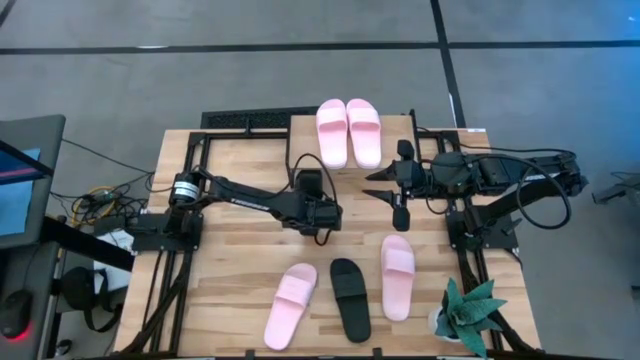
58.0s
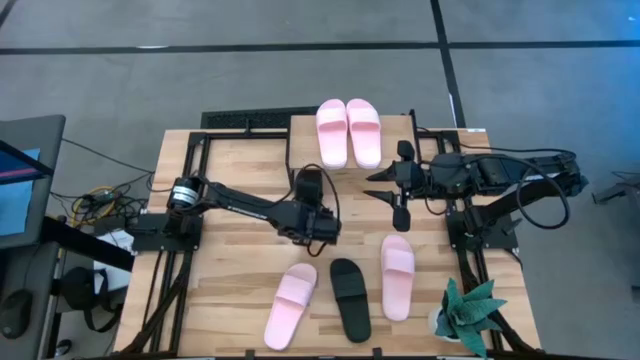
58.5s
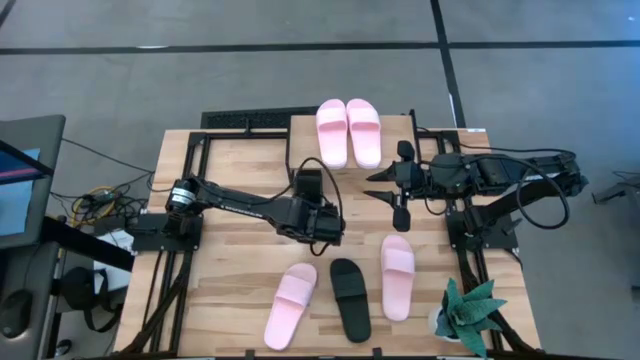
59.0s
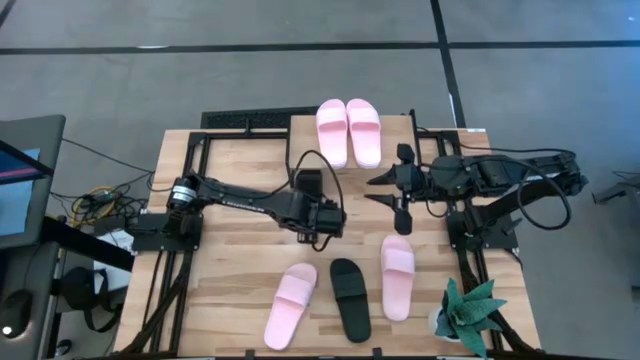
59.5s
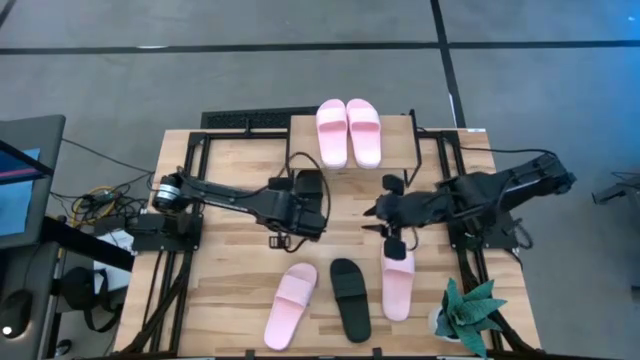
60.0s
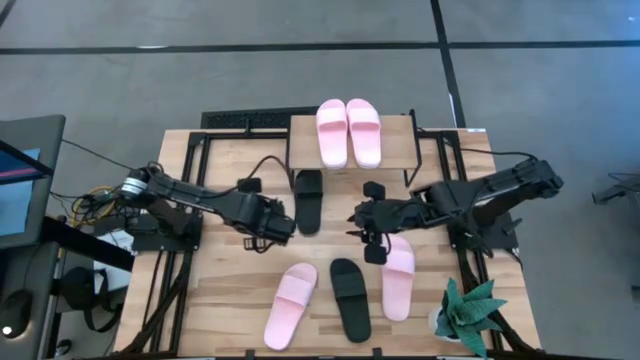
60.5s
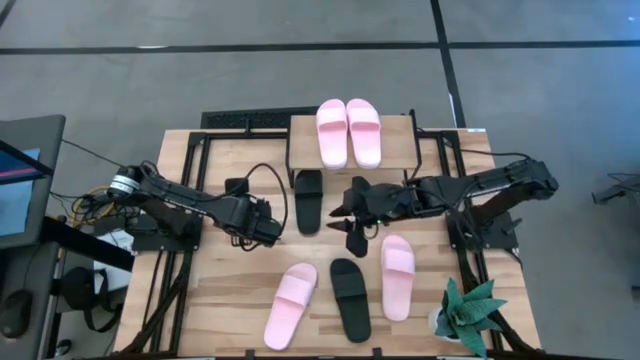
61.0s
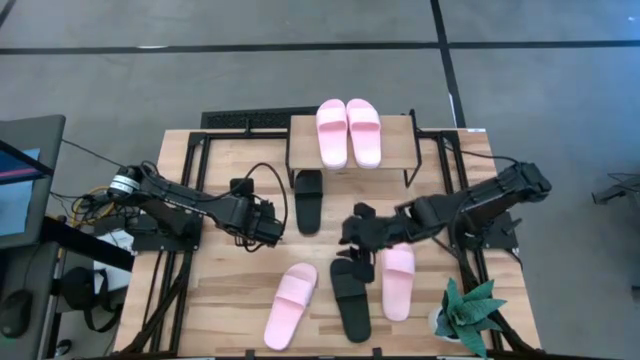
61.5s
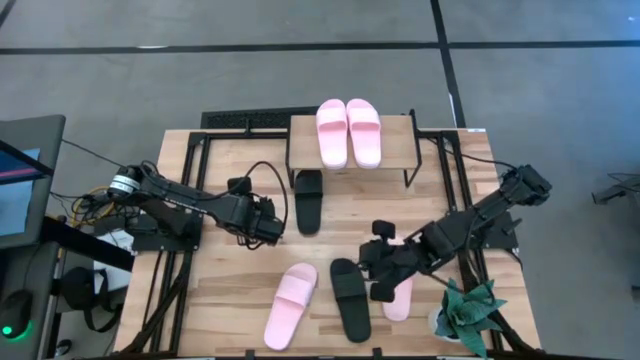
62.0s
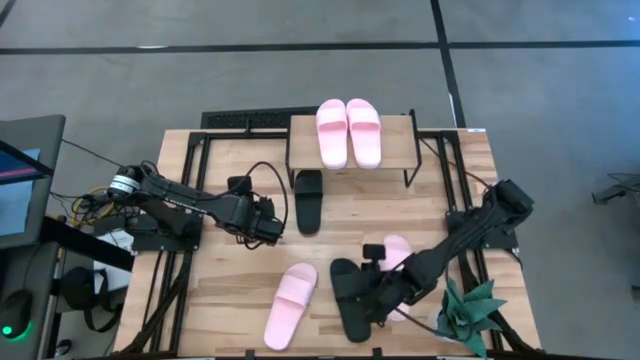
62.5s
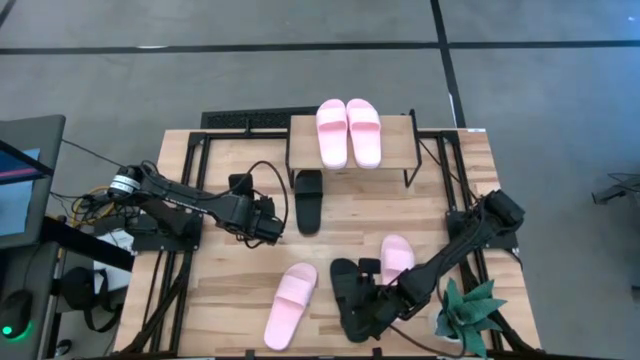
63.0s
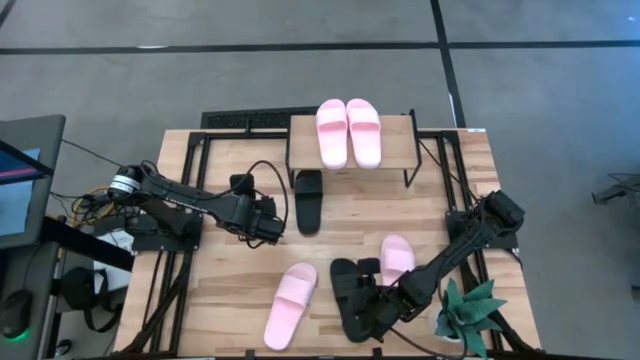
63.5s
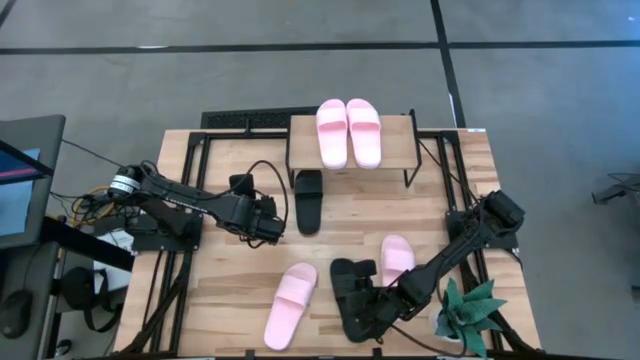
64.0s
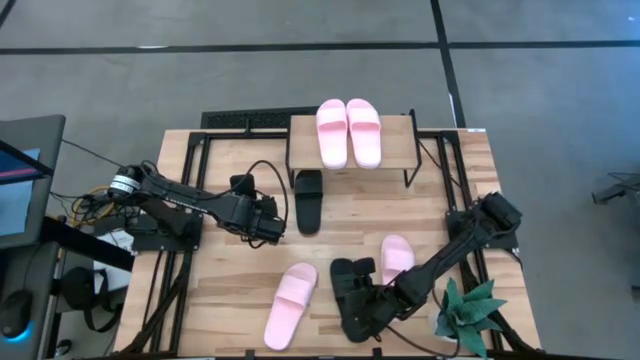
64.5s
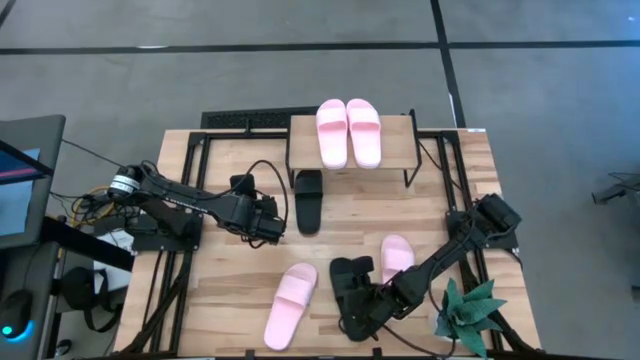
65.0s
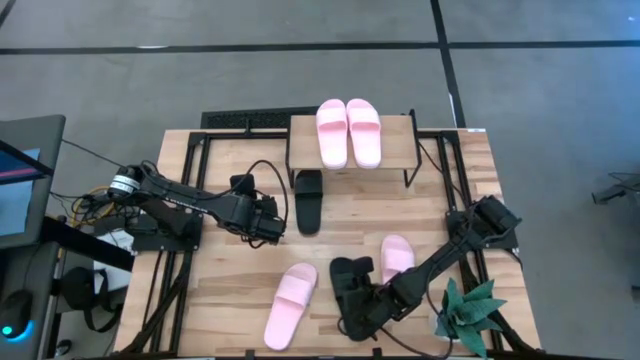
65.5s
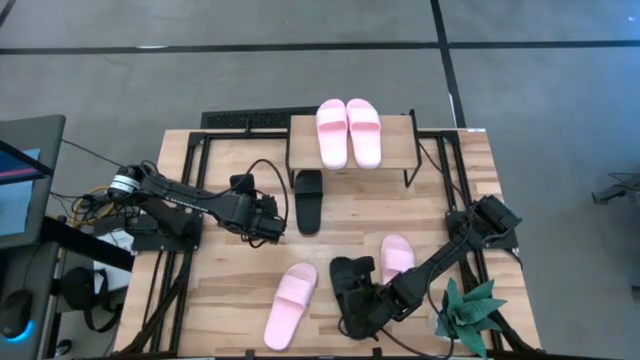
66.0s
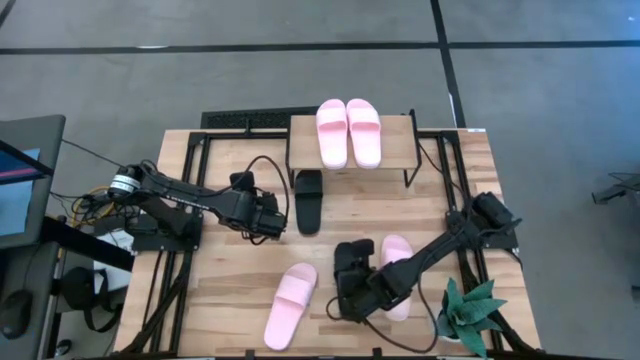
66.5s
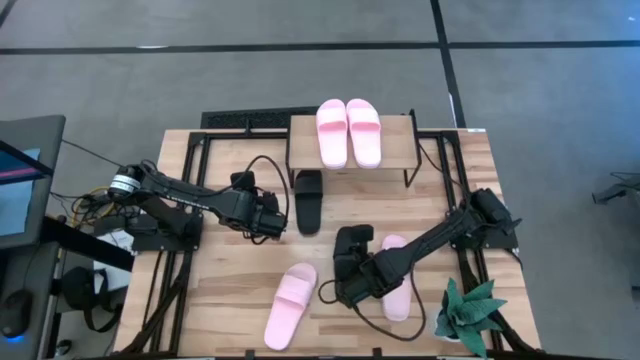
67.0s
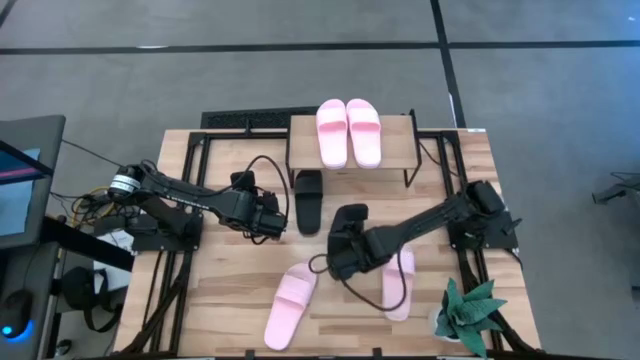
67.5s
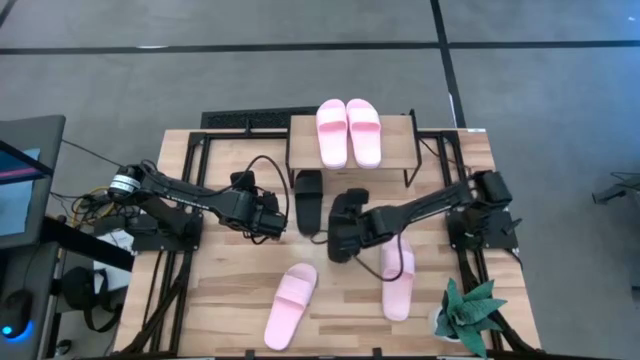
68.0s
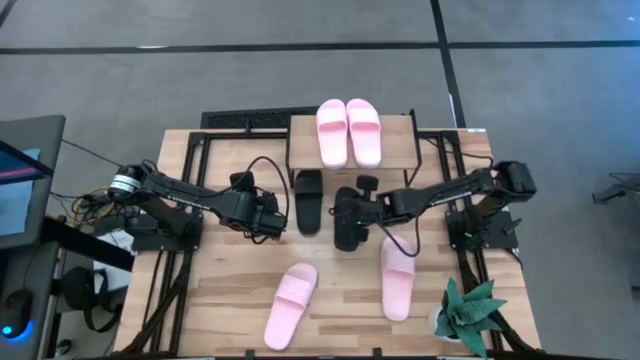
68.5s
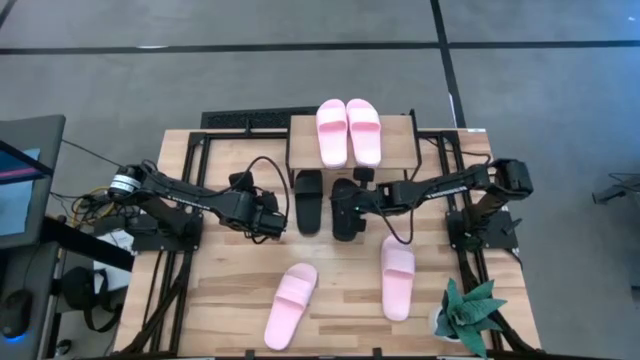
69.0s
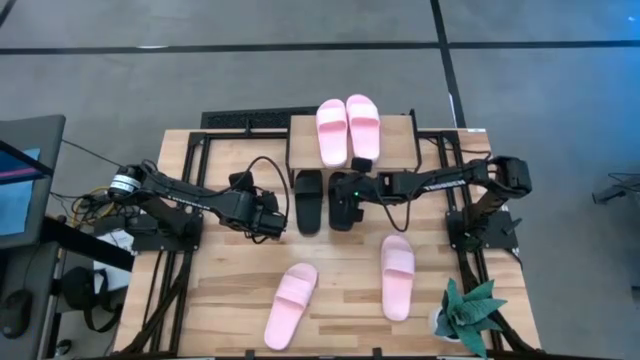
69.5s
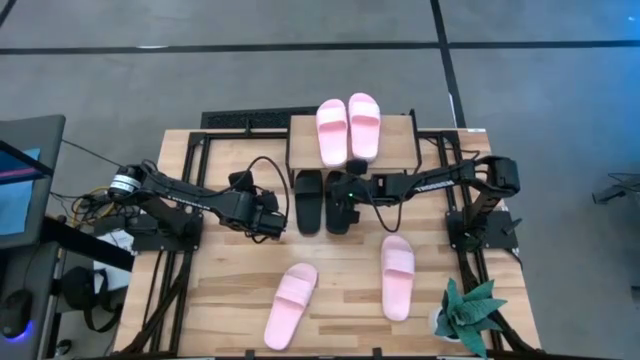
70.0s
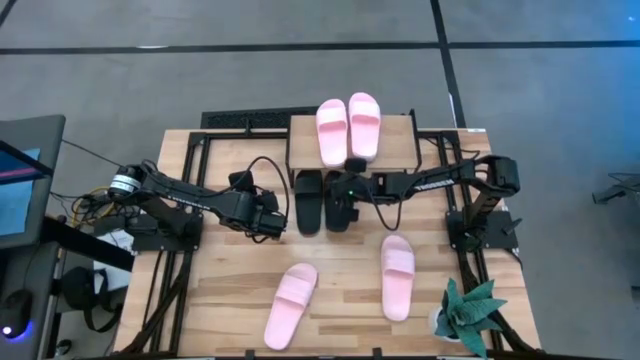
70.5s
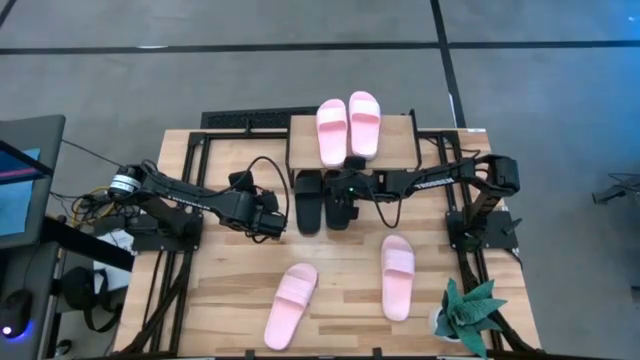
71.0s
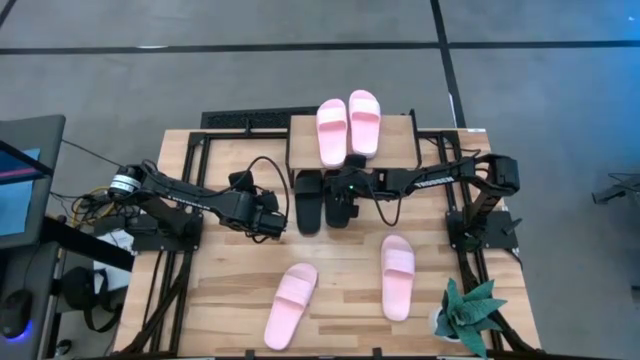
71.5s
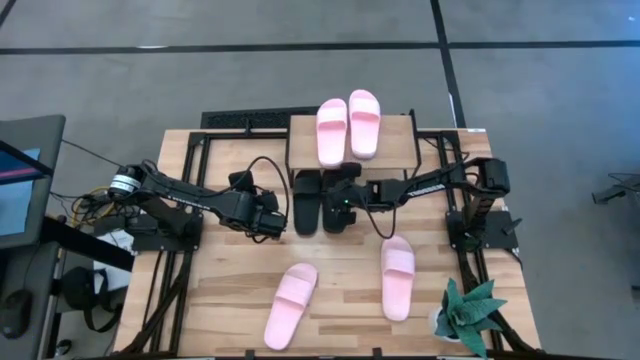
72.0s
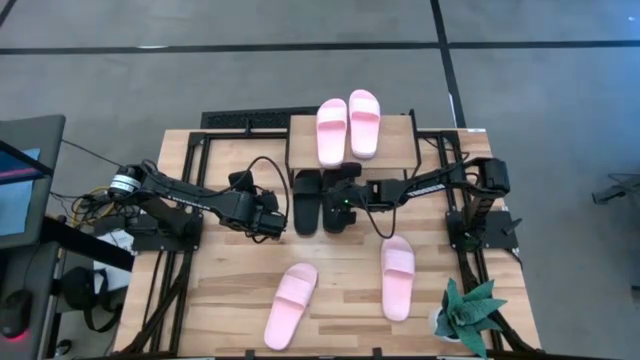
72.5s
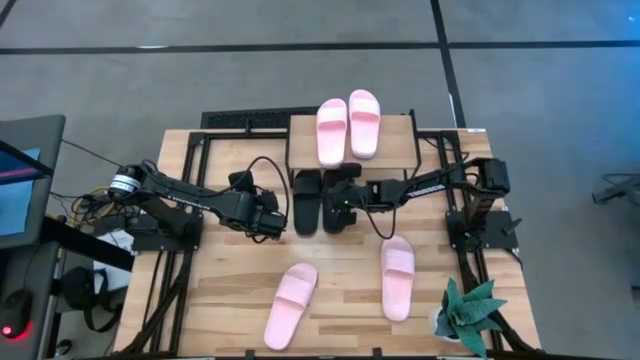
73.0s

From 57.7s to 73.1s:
Task: Pick and place slides into the shelf
Put the black slide under the shelf

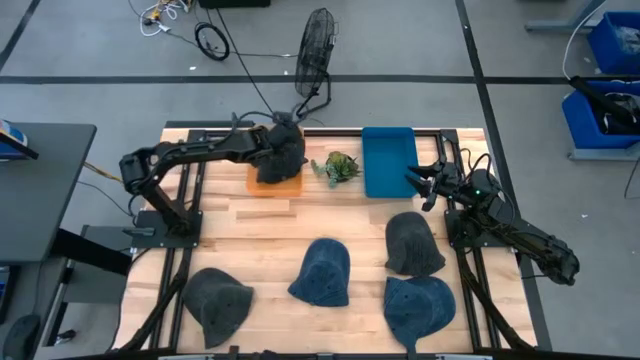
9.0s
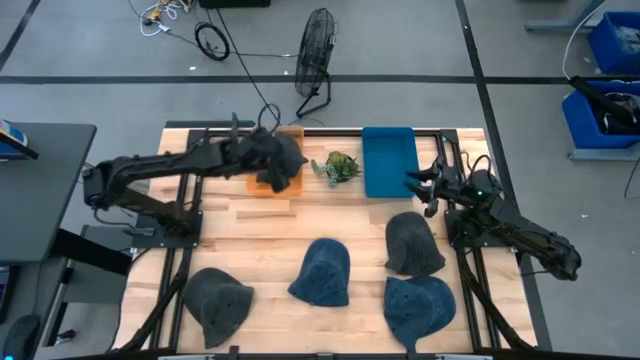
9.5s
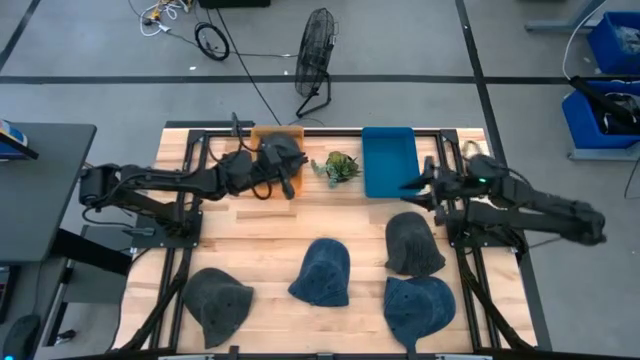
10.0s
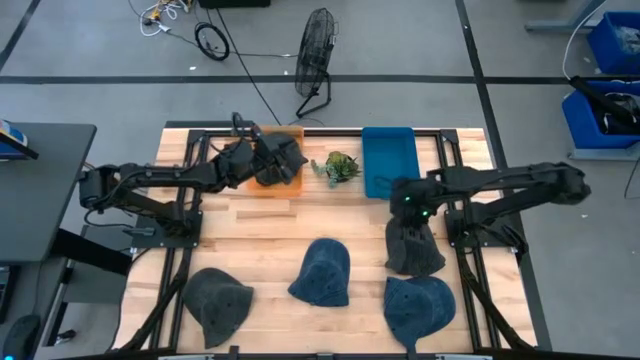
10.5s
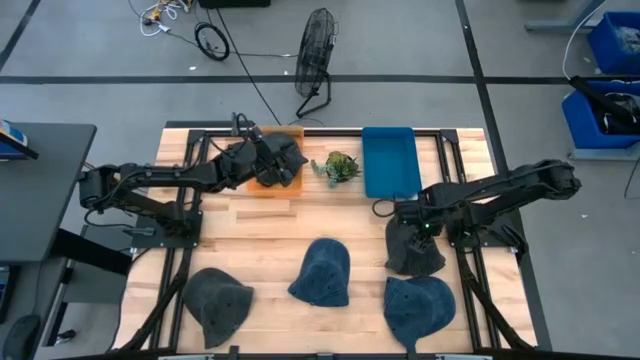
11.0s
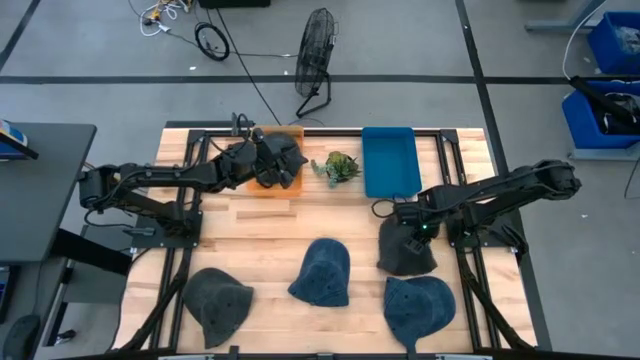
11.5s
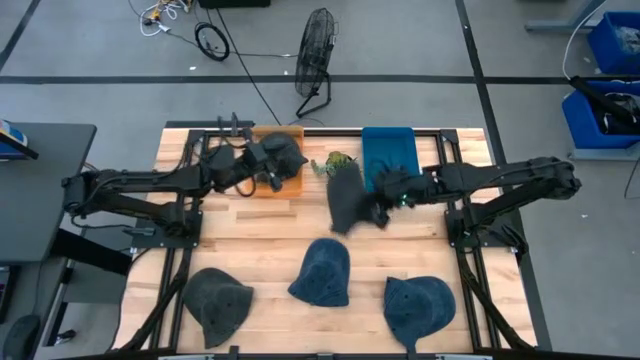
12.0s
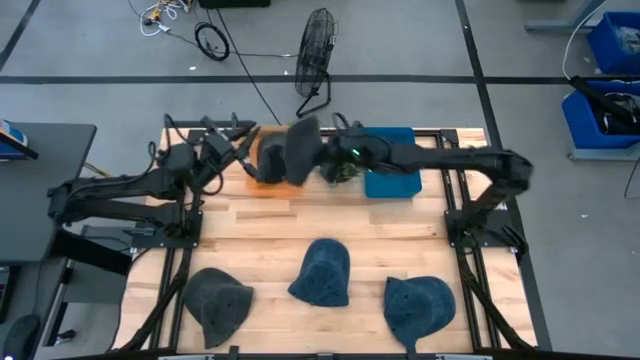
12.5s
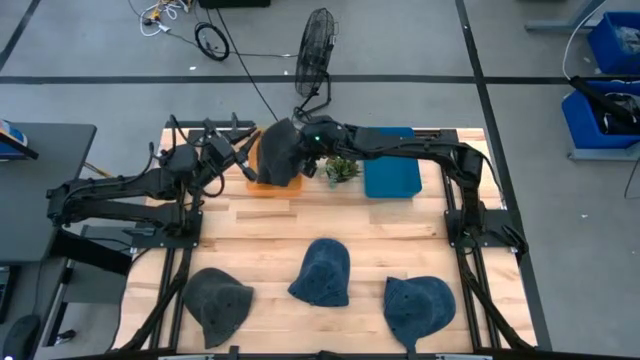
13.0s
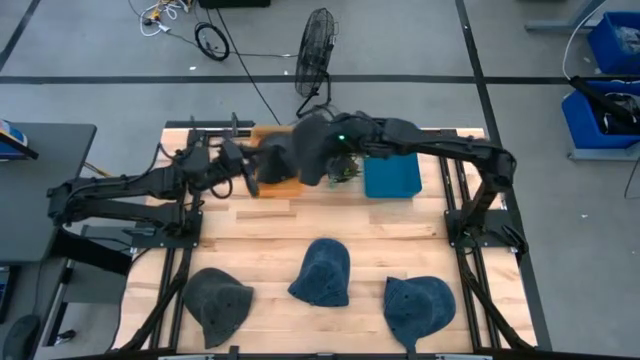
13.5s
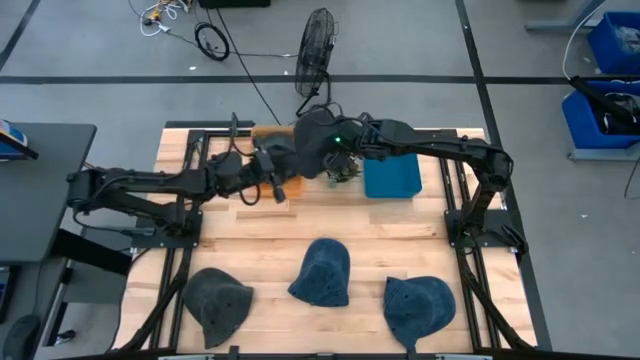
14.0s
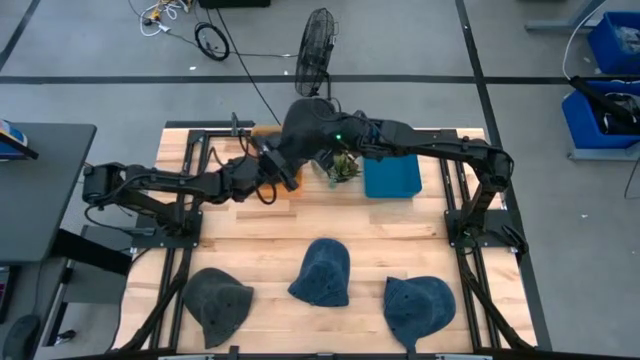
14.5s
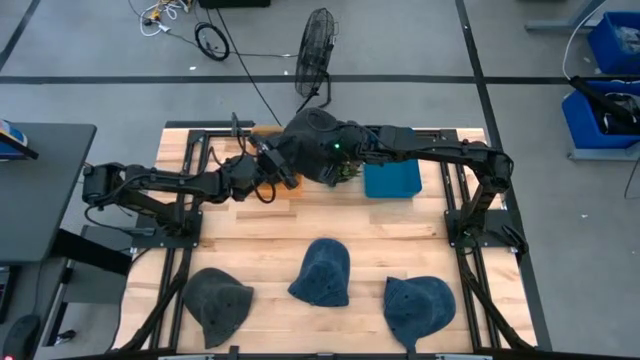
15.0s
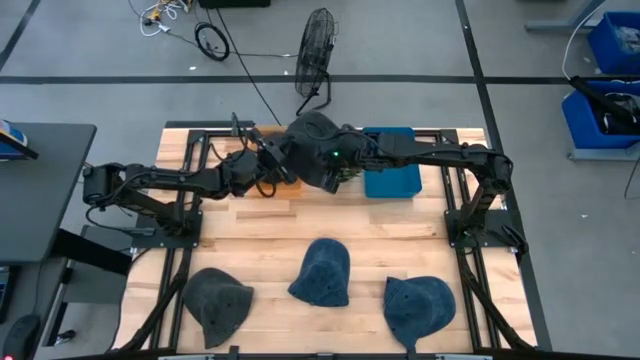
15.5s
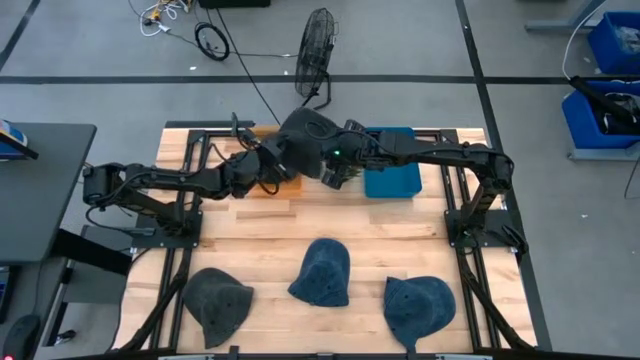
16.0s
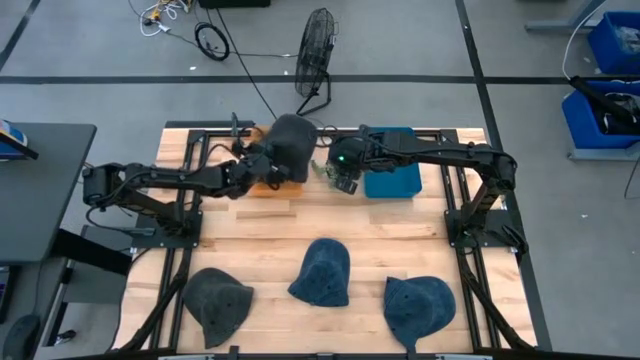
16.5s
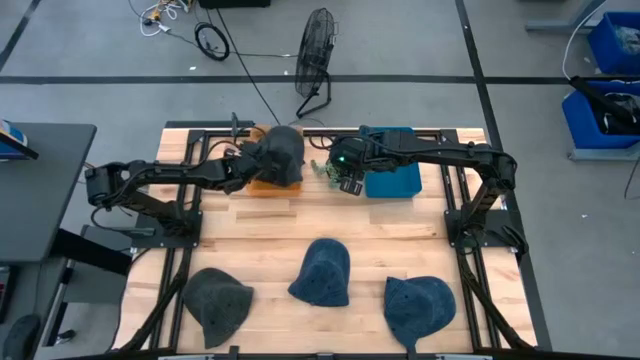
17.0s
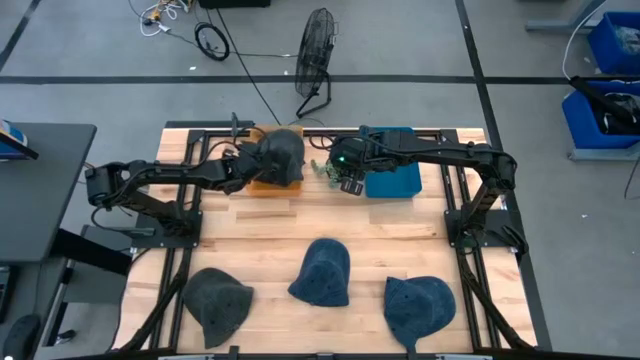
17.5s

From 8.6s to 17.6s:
Task: Pick & Place hat
Put the right black cap into the orange bin
